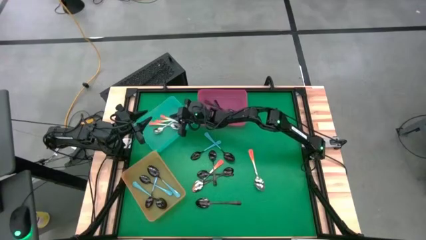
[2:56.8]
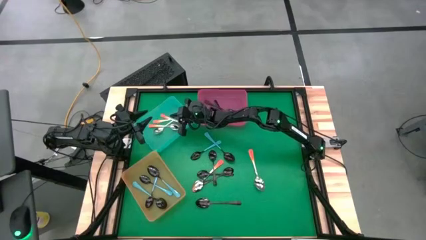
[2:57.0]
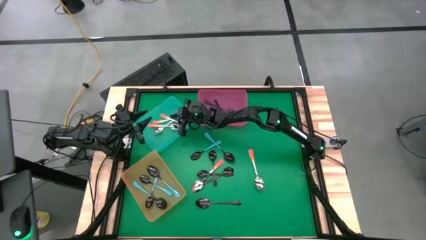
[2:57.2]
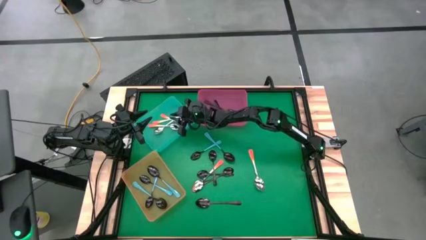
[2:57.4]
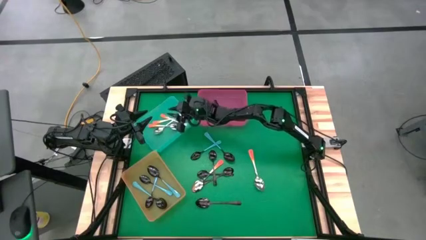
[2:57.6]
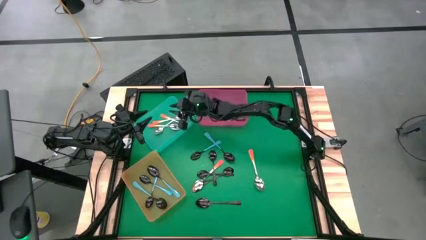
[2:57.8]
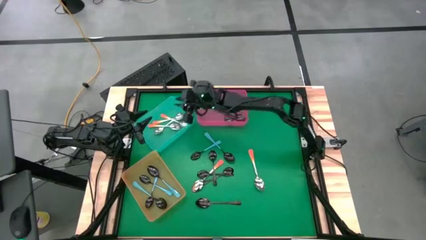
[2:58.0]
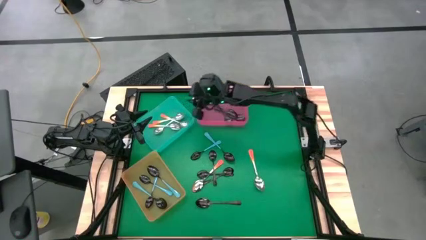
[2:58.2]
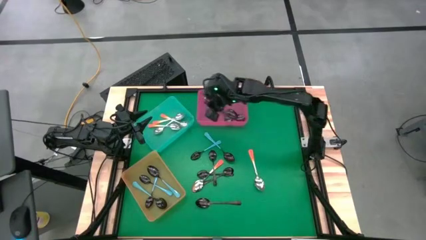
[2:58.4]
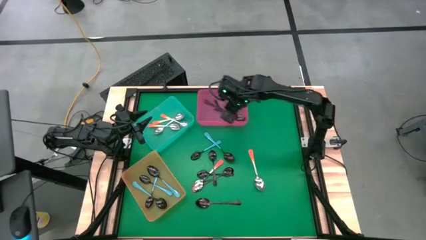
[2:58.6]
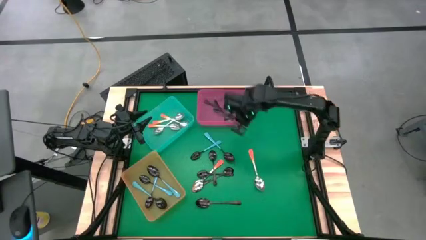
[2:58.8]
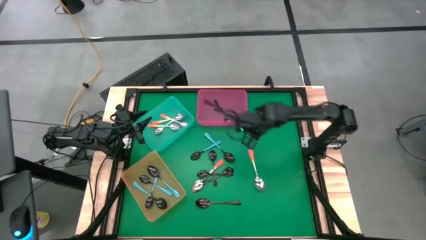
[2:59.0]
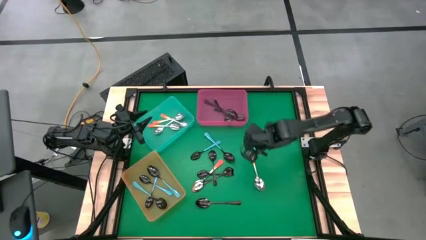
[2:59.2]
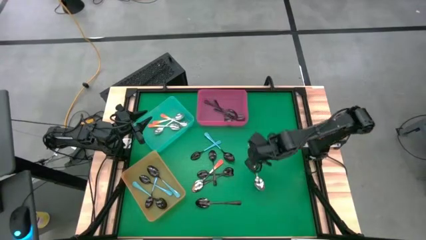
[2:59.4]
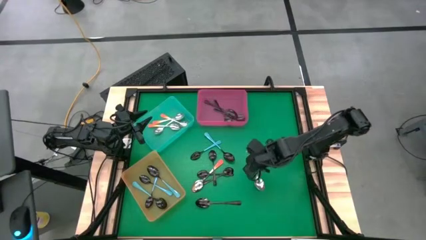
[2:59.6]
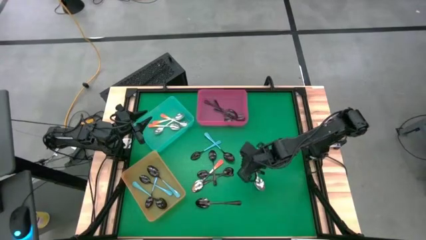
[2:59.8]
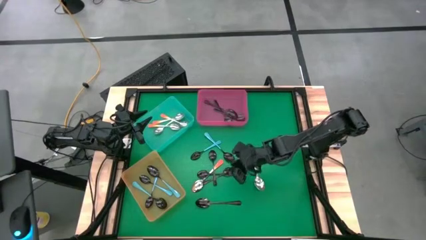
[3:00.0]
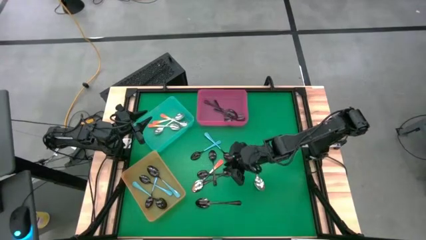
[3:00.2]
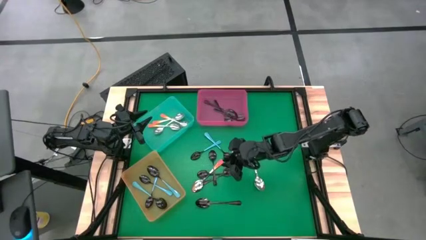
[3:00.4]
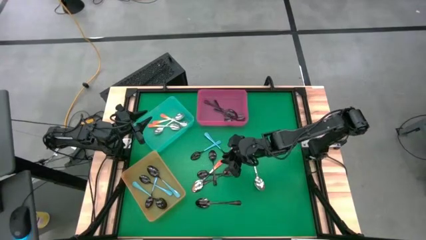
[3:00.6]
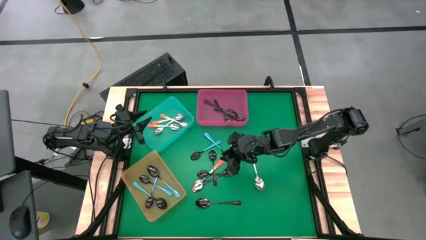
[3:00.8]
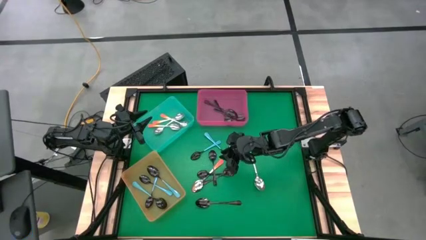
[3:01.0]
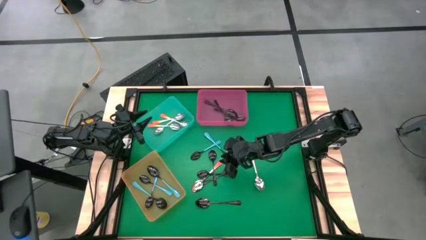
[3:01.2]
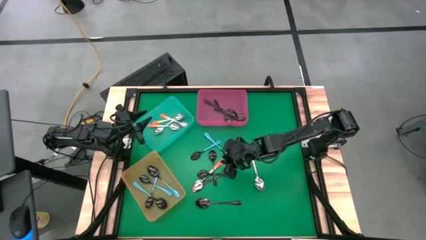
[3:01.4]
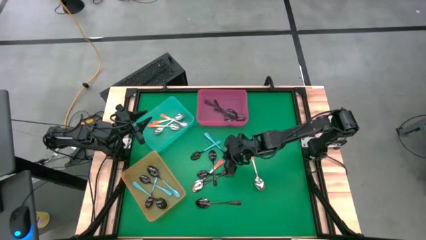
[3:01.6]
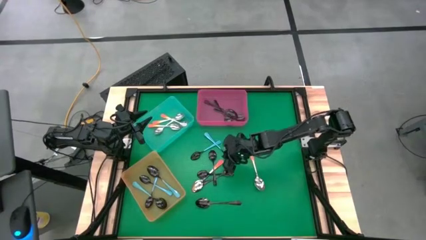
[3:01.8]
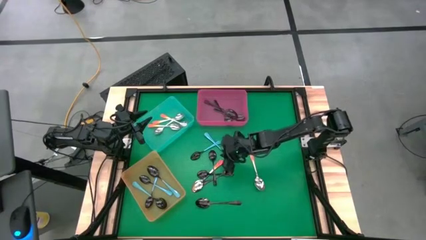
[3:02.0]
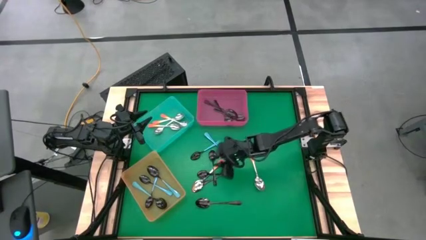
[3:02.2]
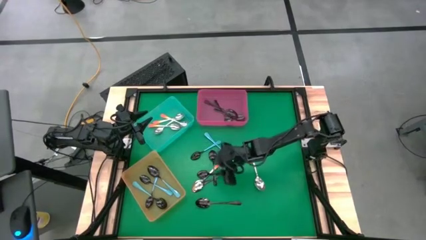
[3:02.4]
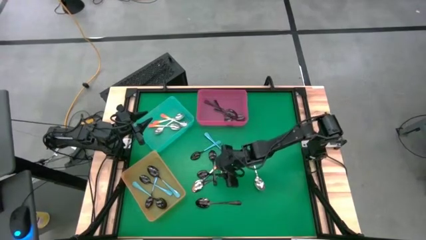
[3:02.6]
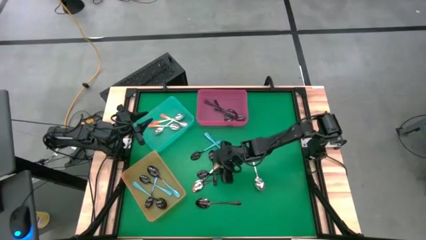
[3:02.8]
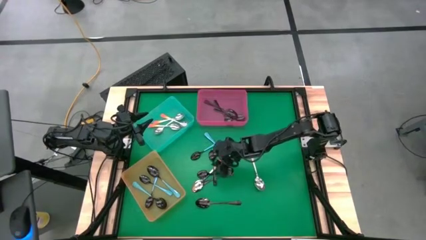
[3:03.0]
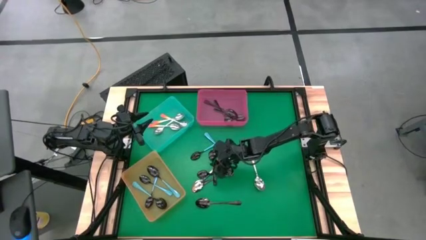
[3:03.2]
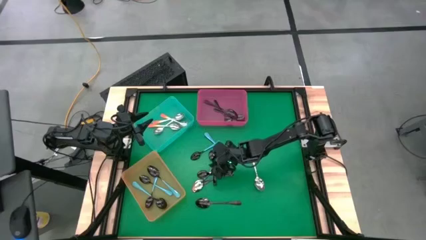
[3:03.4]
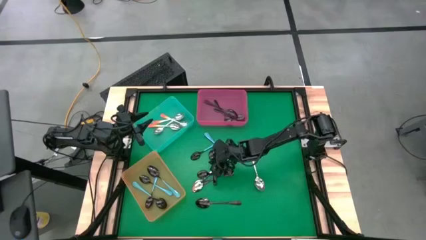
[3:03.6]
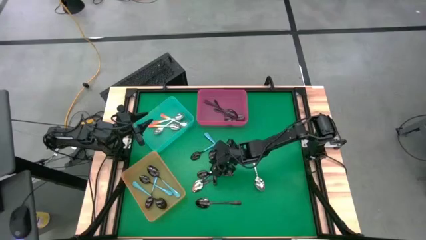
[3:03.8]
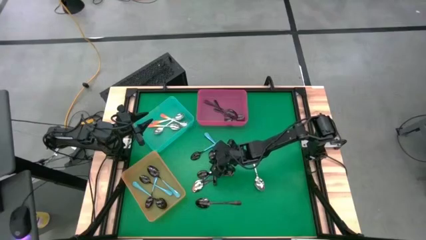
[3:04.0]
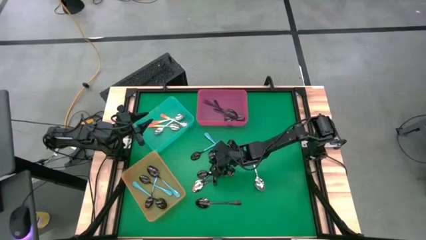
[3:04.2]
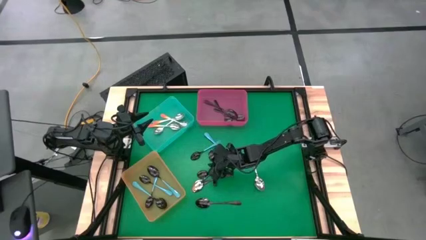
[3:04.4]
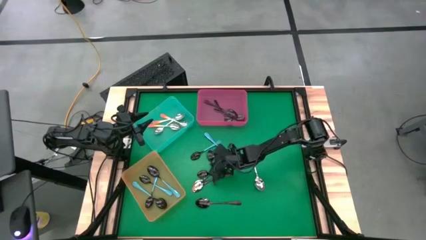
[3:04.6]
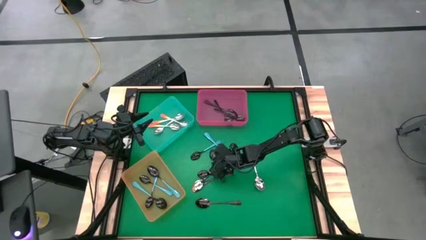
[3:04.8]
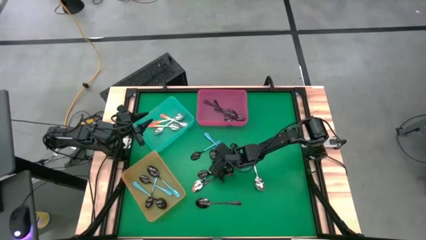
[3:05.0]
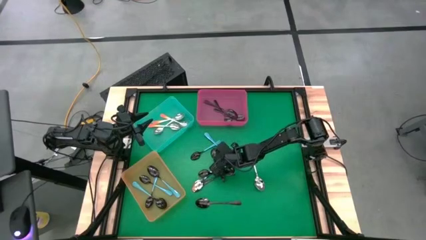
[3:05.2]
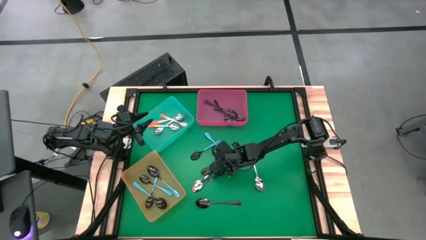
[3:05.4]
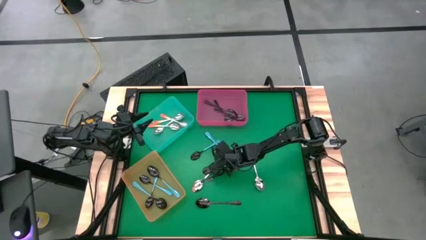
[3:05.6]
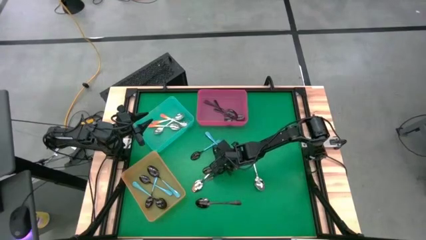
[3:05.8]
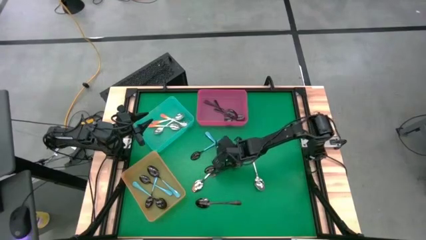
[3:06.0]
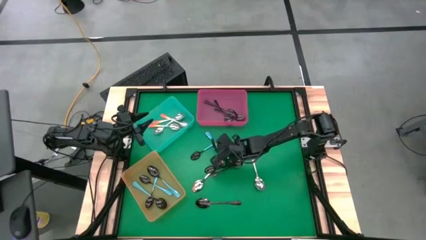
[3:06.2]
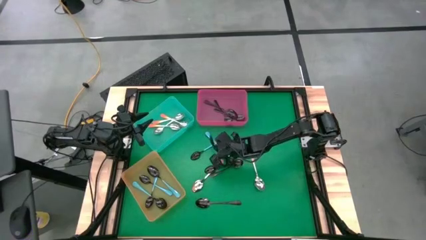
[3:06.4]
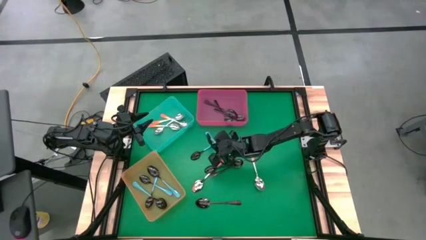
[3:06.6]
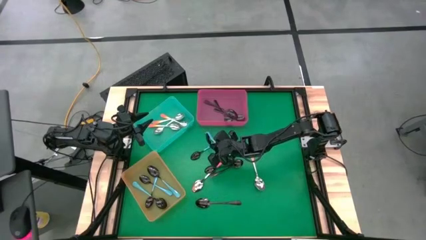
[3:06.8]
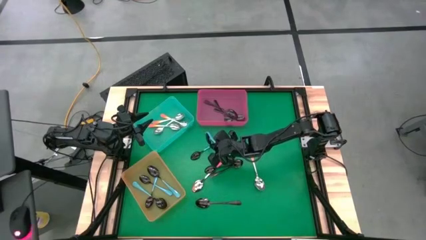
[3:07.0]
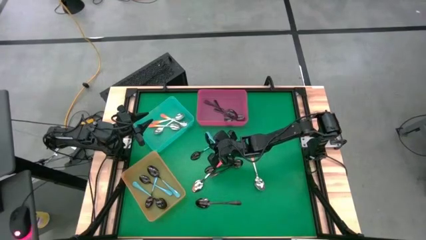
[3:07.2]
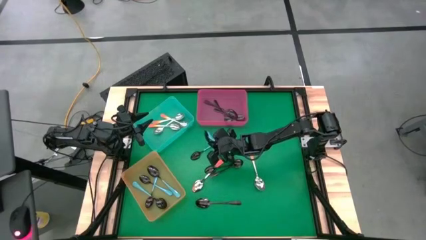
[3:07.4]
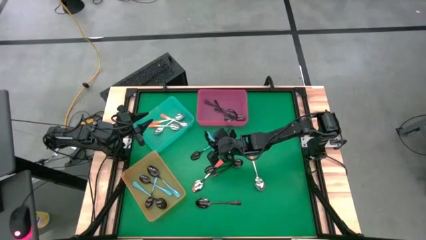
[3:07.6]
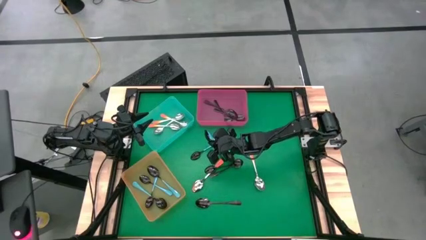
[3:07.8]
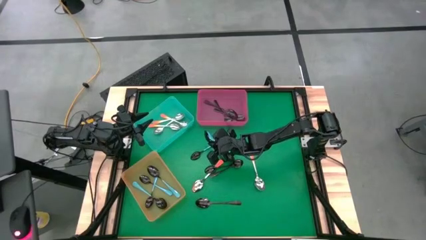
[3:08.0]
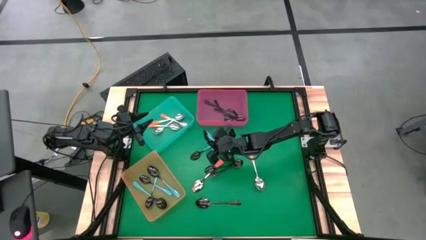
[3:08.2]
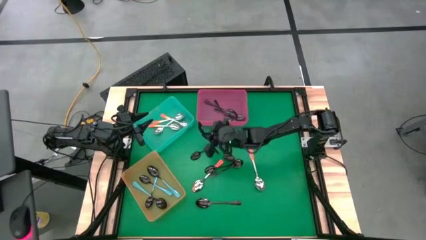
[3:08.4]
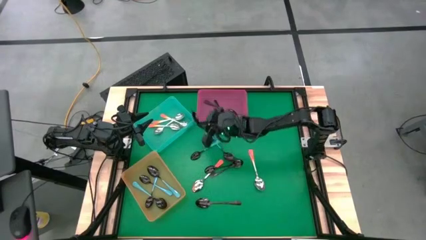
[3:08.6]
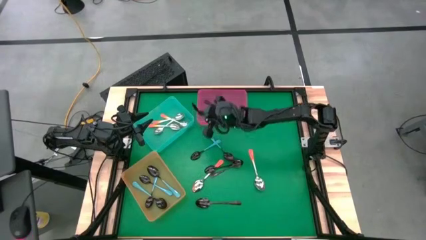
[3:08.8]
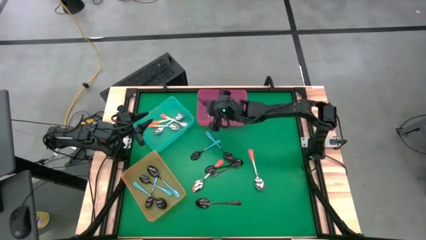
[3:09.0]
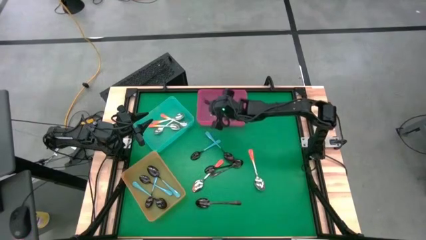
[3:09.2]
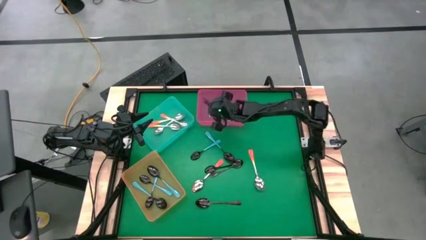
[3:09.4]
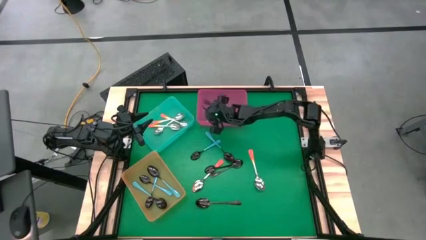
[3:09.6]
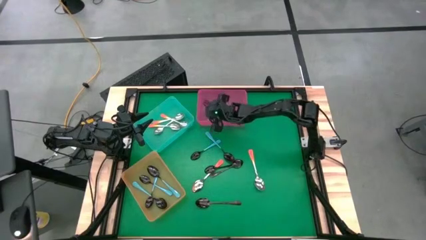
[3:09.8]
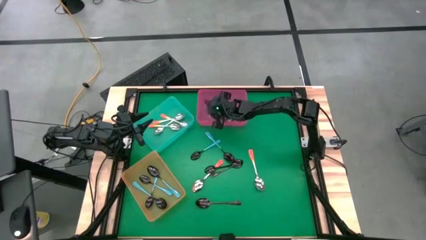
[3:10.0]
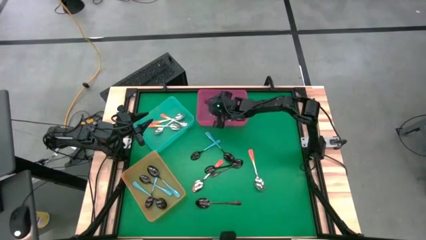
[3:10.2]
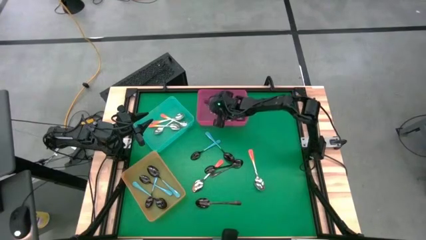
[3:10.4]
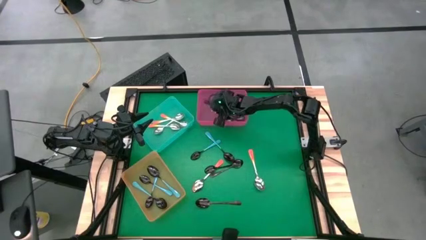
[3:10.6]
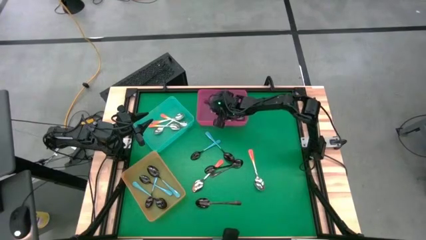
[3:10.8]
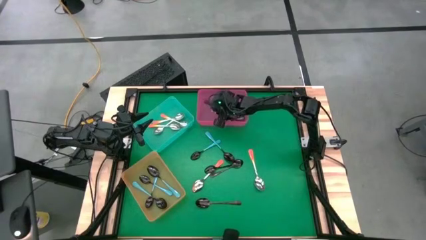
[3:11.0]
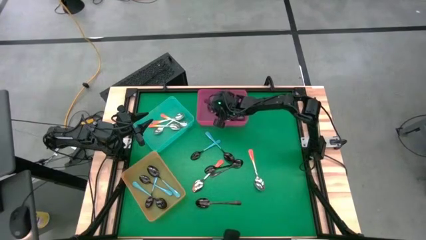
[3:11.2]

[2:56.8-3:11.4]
Task: Sort silverware by color (type)
Put the black spoon into the pink bin

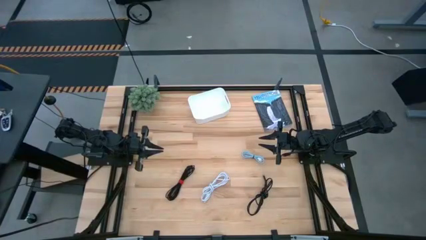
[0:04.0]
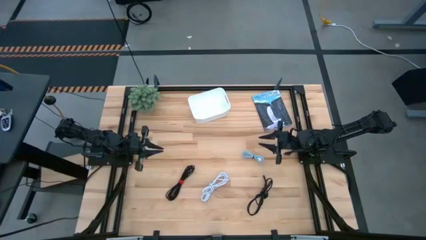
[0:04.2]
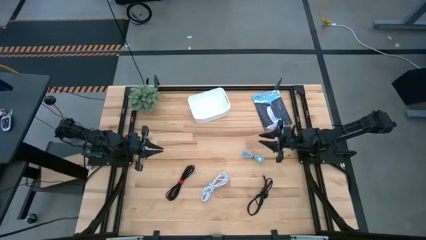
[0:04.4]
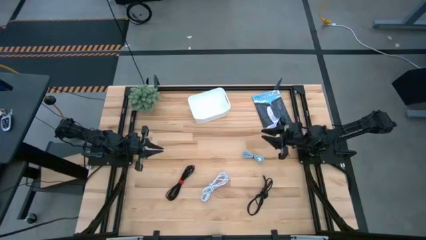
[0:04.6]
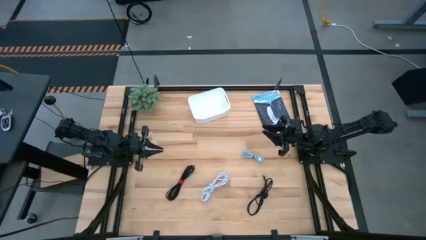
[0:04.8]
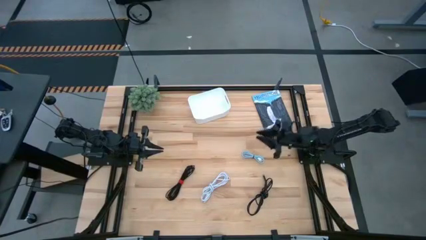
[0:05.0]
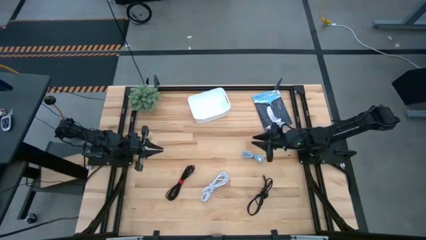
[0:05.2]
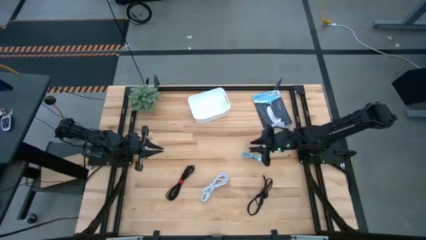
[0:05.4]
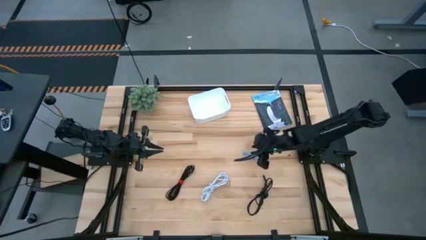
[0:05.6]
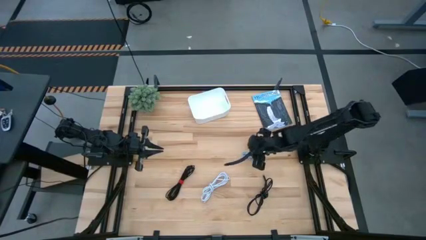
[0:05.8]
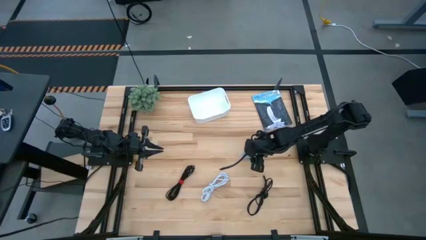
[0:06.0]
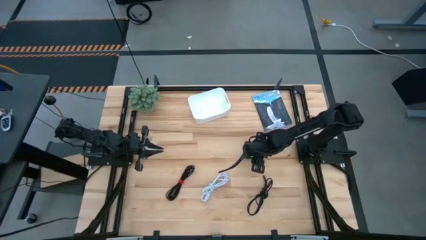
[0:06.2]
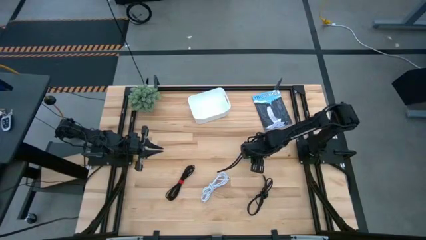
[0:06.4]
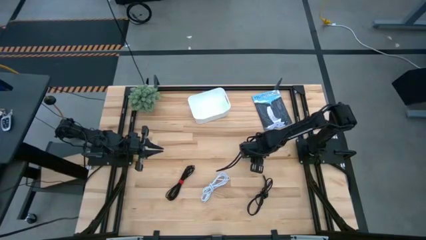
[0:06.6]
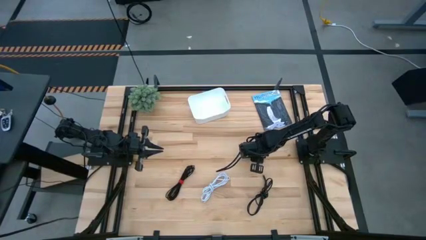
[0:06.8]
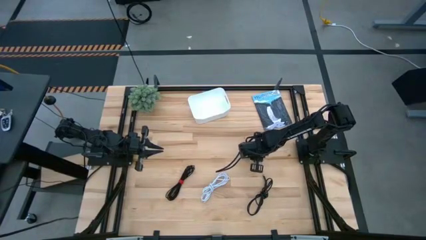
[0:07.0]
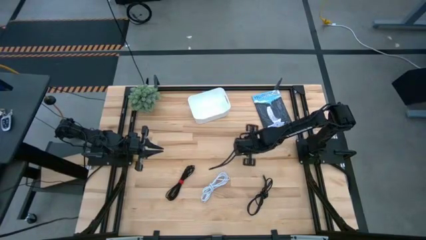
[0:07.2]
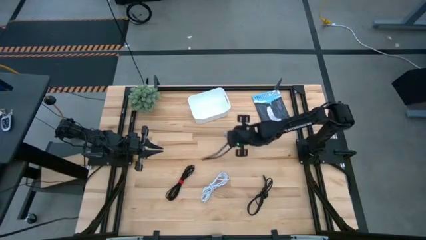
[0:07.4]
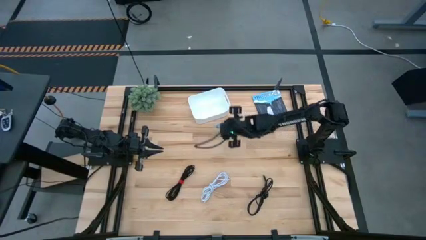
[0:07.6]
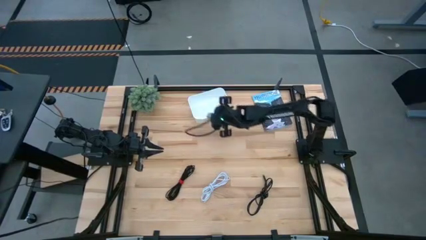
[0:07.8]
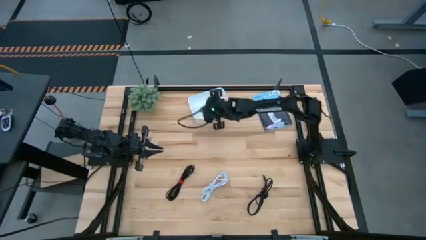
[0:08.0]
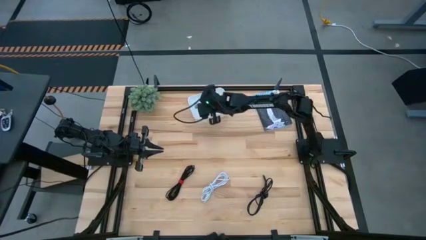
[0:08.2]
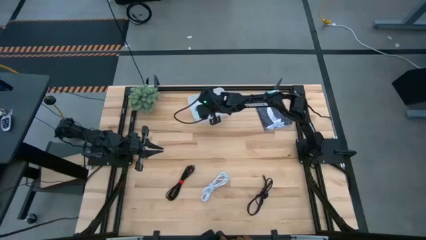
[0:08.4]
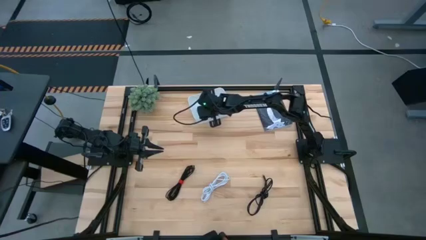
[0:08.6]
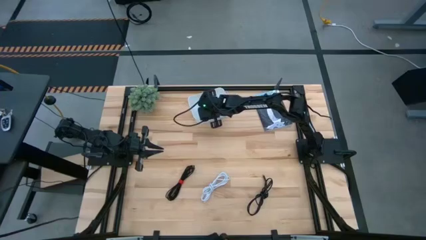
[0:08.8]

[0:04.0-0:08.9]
Task: Pick and place USB-C Cables
Put the blue charger cable into the white bin
